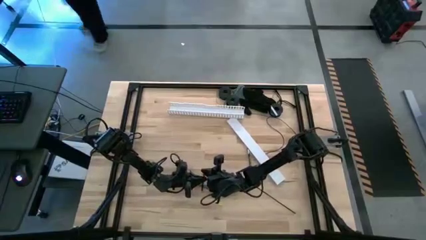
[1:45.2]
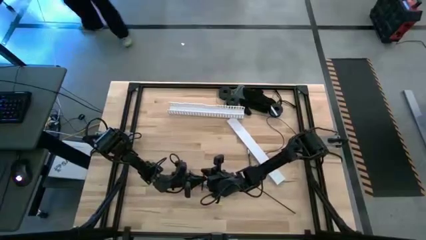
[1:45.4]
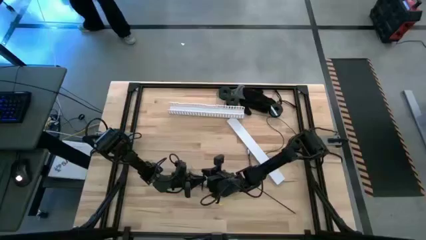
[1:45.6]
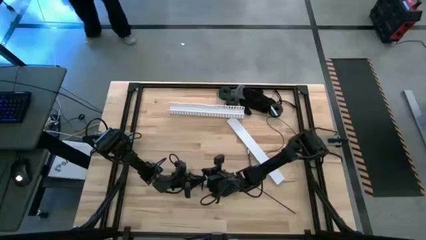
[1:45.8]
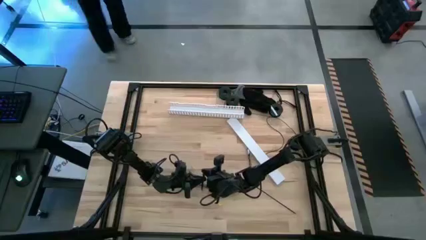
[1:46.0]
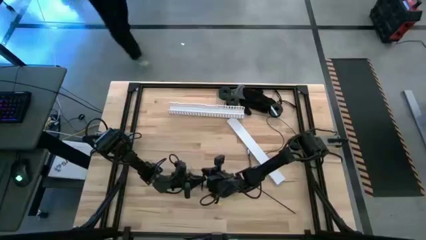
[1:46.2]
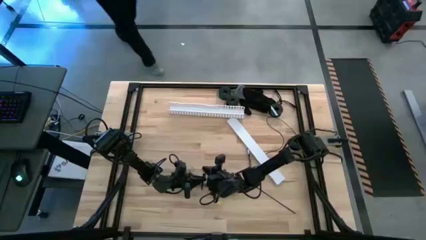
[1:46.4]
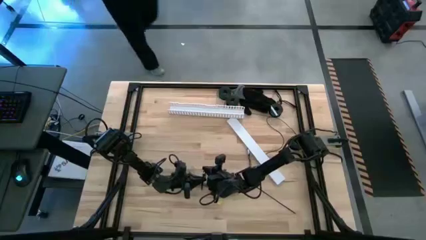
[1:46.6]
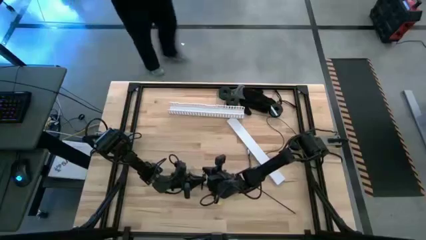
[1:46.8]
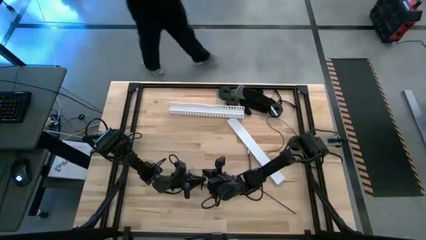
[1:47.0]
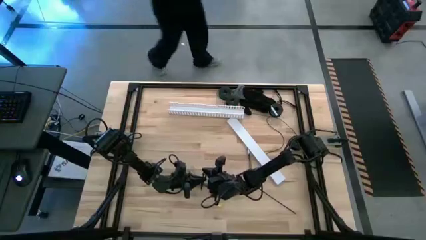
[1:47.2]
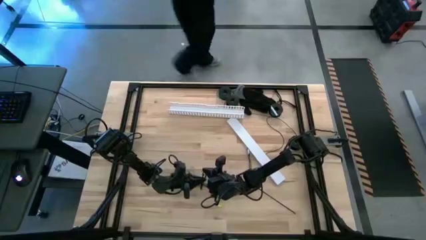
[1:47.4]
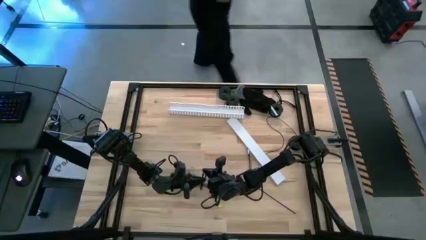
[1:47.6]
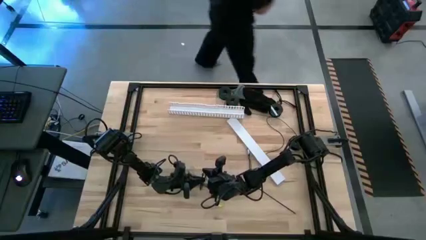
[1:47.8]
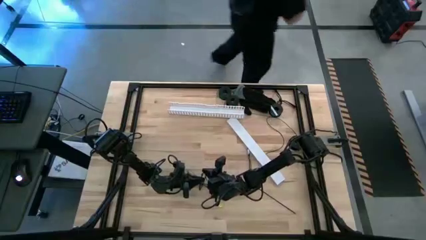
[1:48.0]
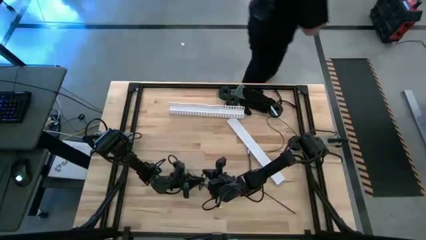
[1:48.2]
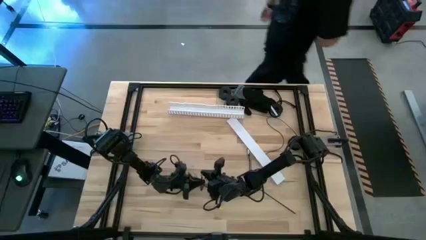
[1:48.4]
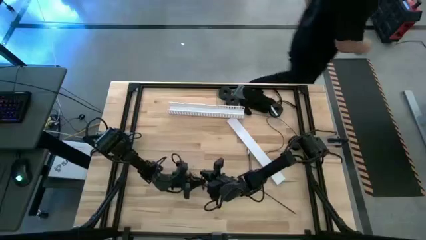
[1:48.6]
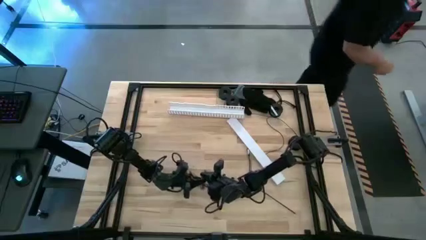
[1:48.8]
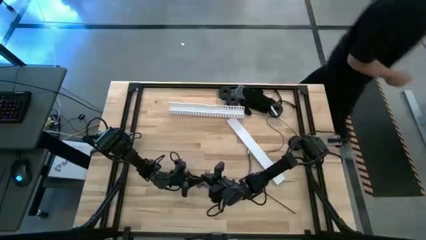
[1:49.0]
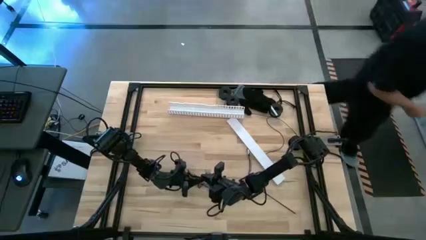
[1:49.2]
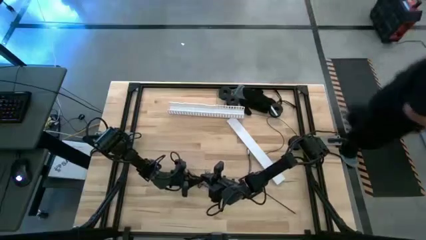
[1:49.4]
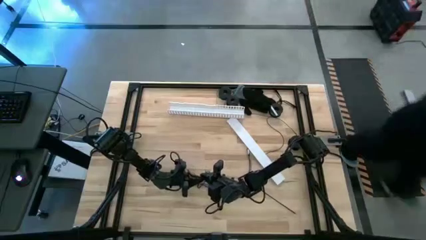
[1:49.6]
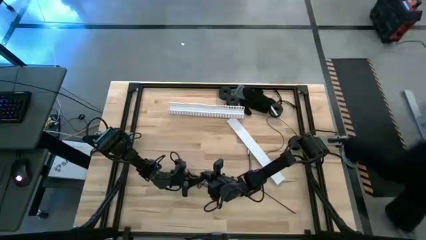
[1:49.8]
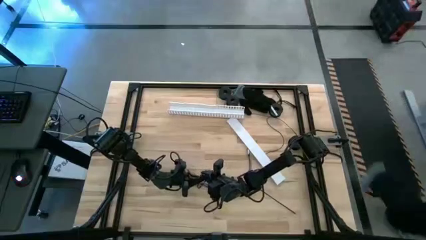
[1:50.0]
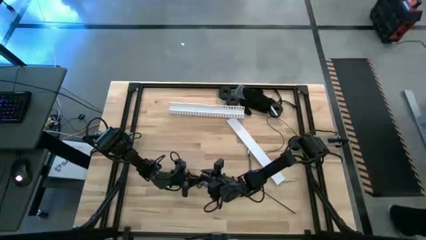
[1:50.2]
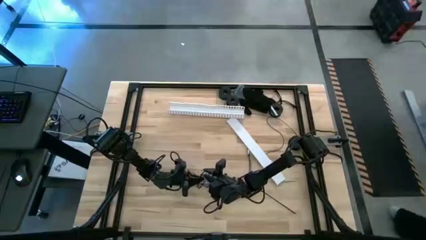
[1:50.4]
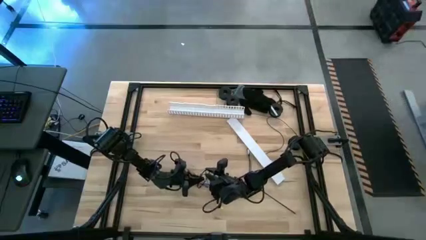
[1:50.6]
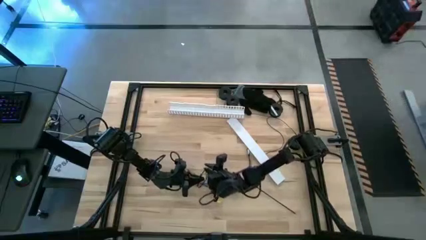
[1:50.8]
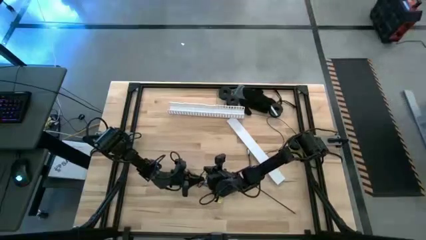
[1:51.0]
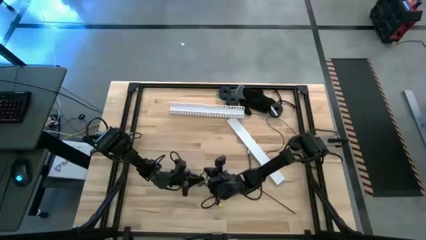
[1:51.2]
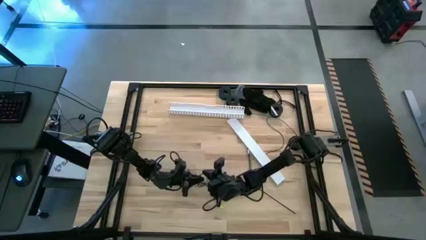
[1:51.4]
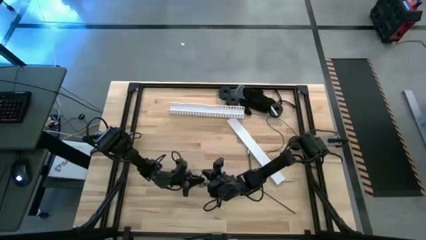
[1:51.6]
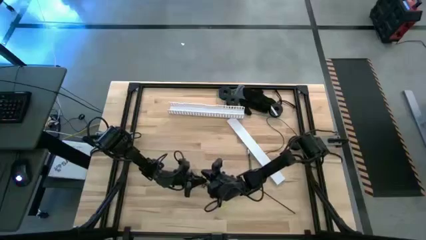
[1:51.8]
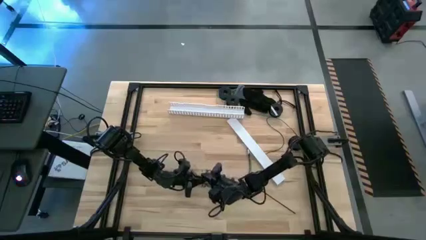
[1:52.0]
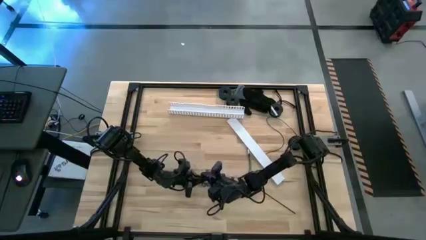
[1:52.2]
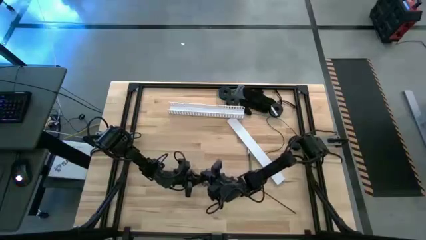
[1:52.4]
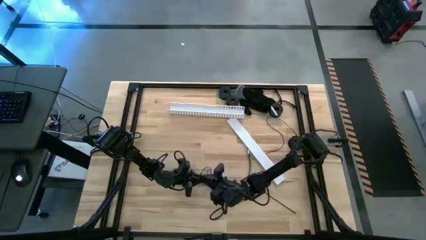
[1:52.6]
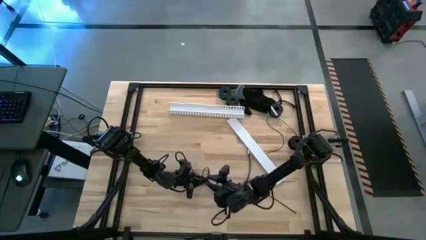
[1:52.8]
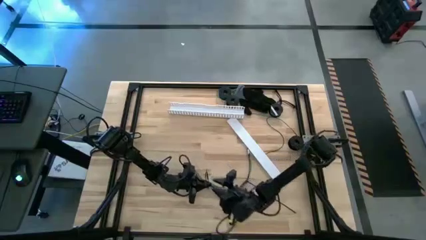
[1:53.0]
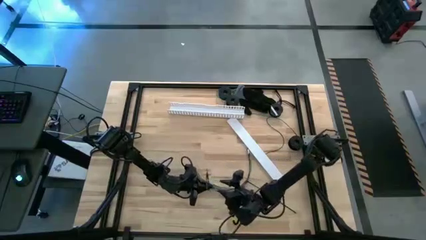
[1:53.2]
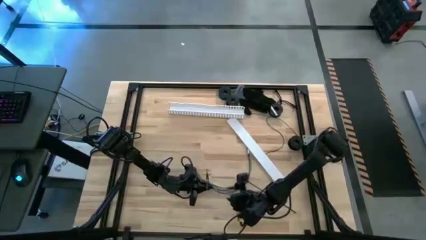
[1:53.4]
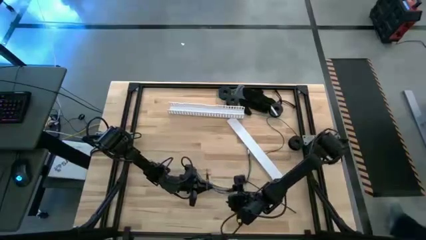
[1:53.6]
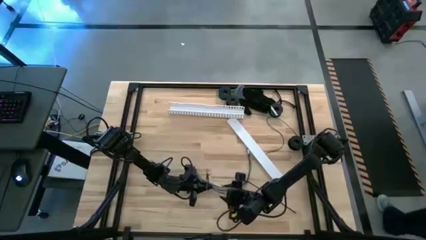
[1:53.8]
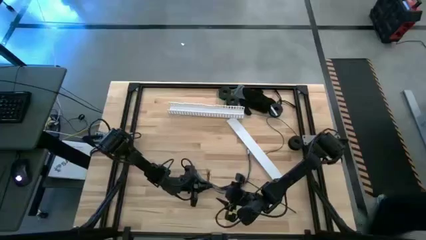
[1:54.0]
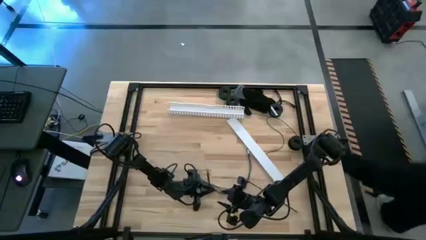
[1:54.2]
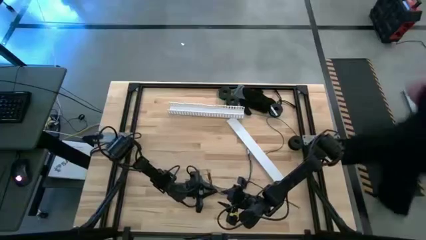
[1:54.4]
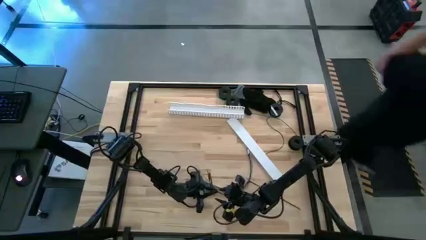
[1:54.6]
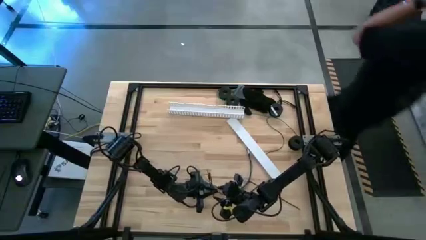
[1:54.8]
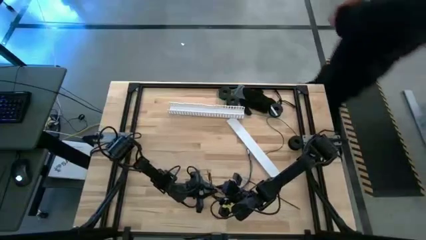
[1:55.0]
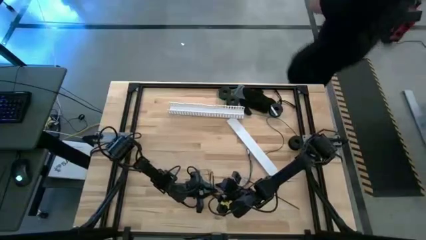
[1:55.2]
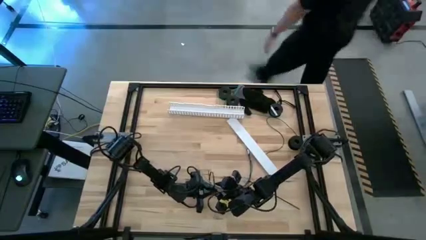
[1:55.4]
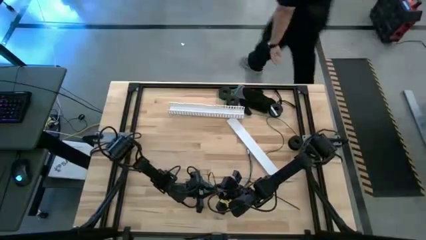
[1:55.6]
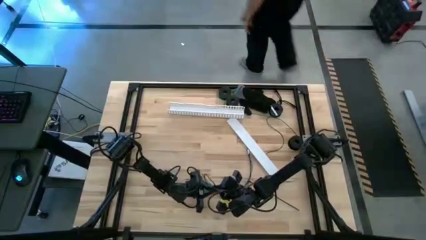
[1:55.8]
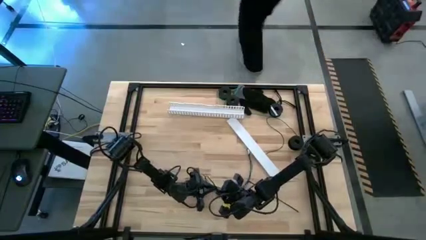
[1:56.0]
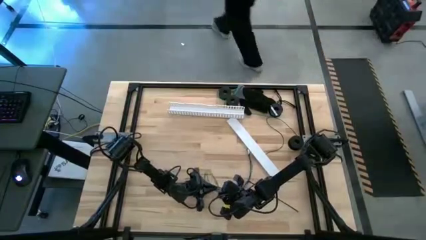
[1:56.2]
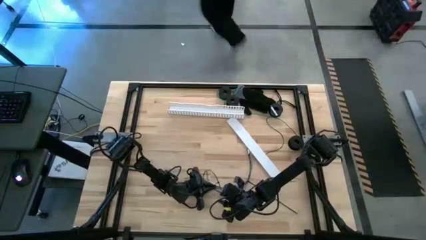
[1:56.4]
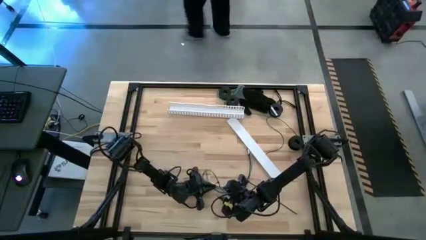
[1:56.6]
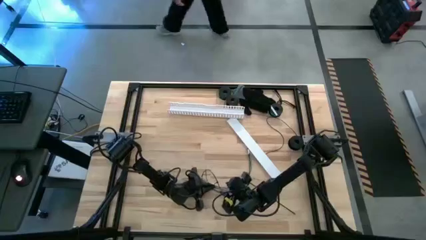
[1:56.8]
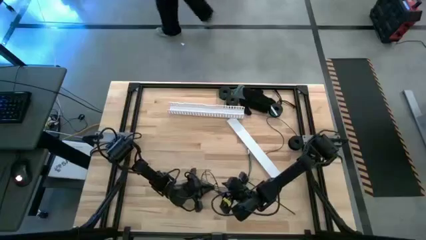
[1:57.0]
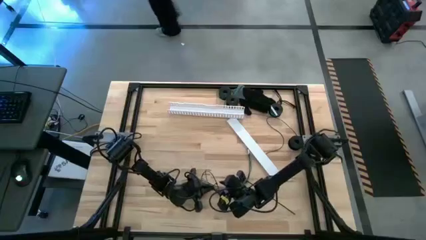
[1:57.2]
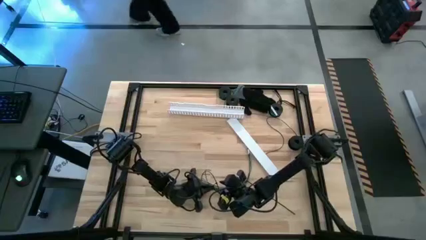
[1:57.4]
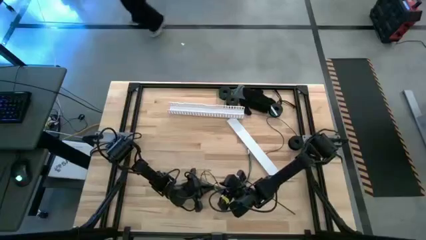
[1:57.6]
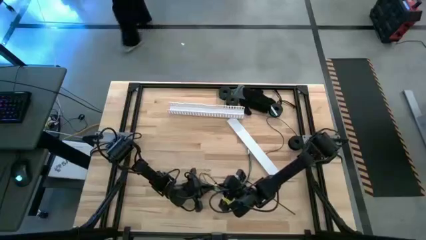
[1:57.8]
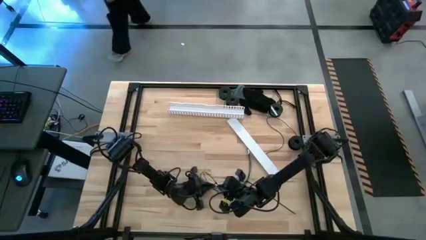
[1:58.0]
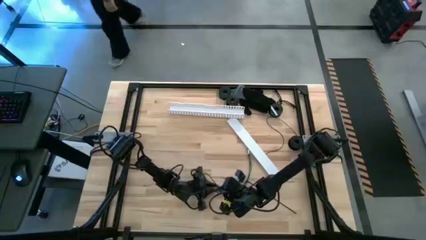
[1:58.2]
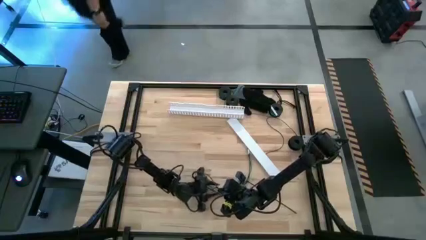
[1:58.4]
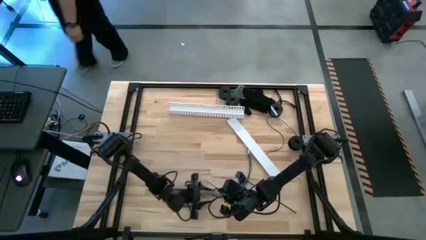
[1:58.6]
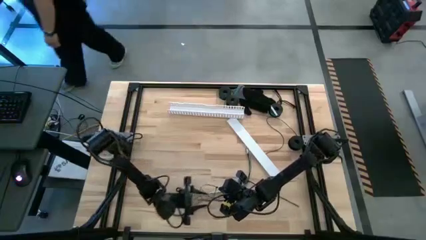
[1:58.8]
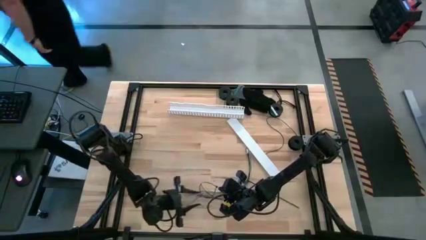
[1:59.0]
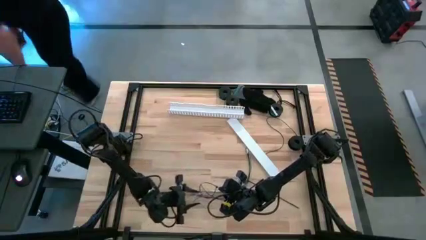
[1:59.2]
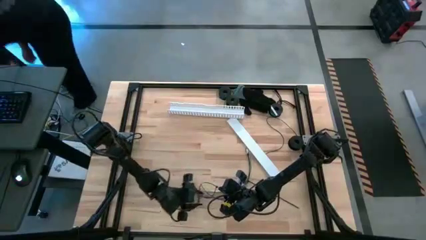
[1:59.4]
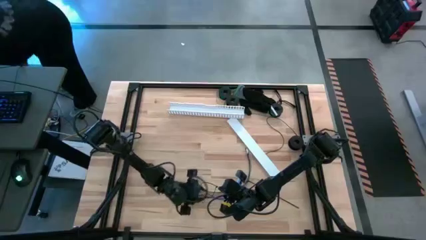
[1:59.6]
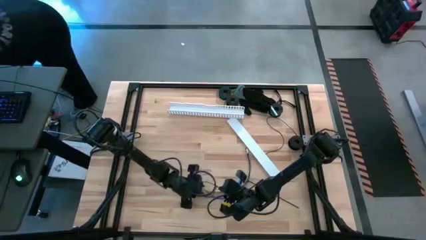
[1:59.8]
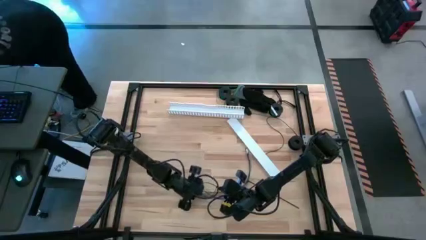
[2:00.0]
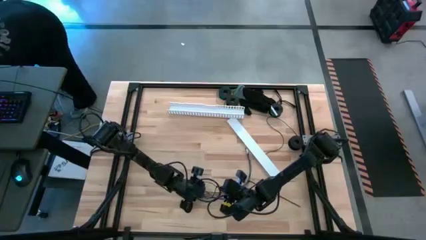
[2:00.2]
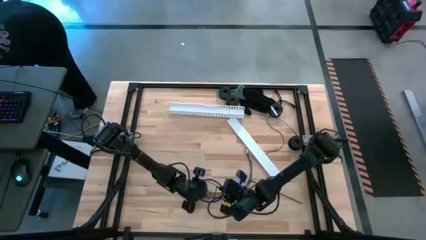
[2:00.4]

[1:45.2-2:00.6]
Task: Ziptie cables
Wrap the wire cables with the black zip tie
